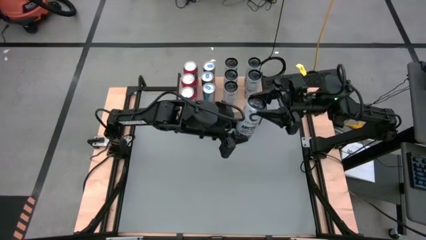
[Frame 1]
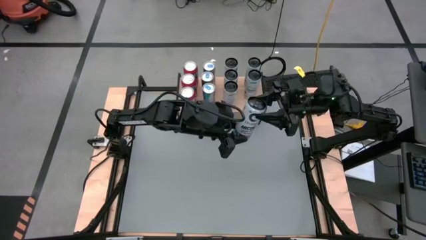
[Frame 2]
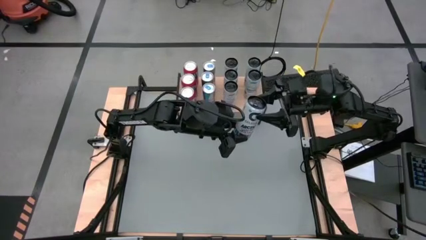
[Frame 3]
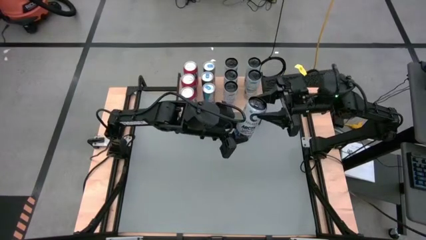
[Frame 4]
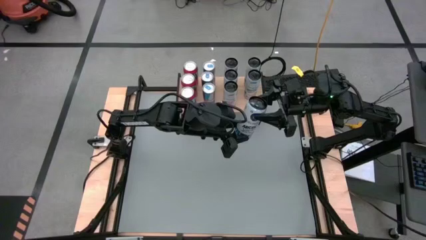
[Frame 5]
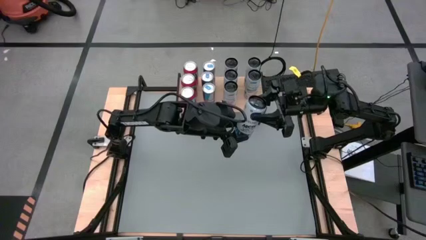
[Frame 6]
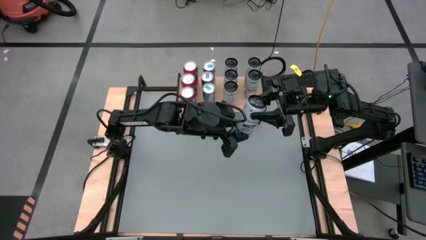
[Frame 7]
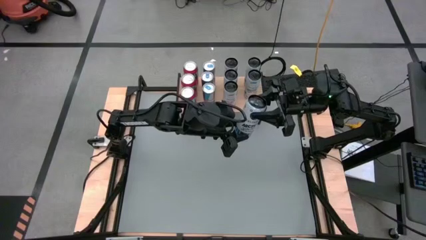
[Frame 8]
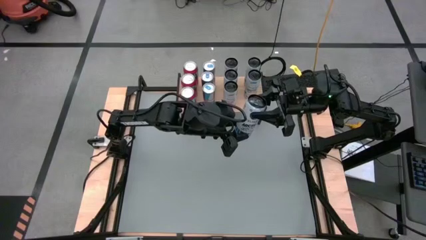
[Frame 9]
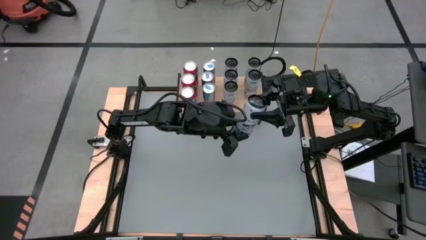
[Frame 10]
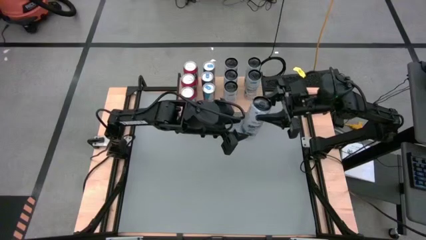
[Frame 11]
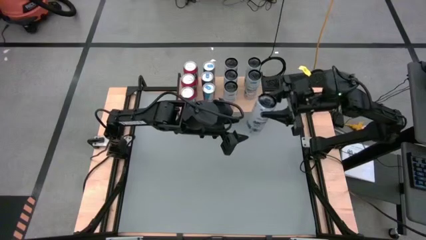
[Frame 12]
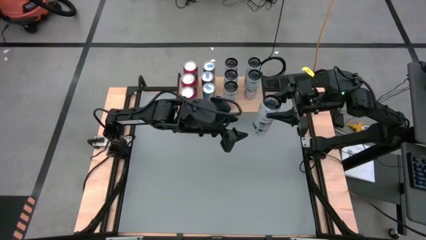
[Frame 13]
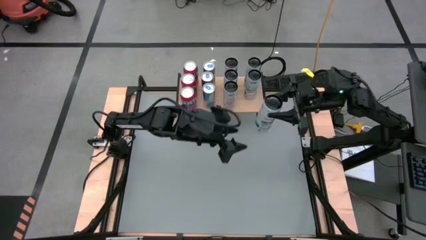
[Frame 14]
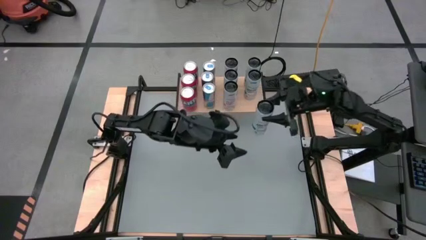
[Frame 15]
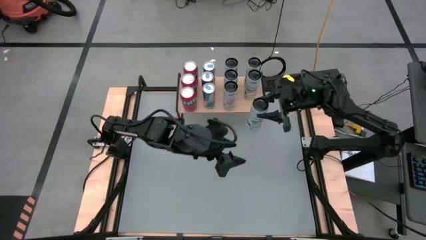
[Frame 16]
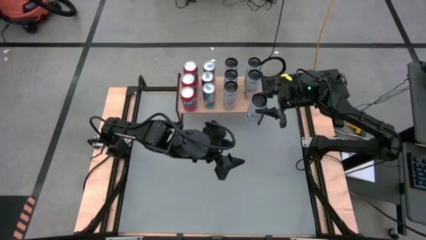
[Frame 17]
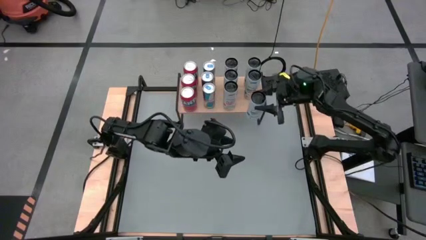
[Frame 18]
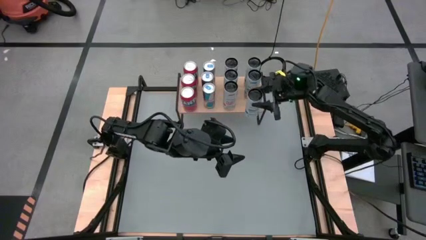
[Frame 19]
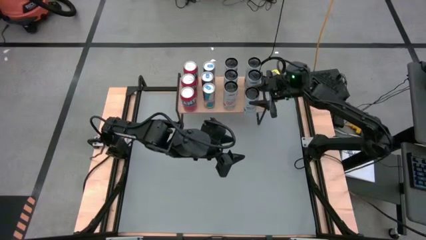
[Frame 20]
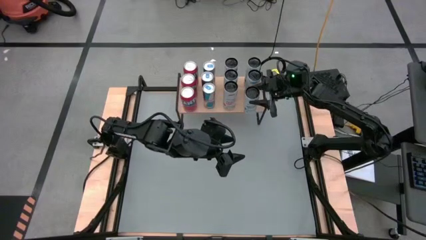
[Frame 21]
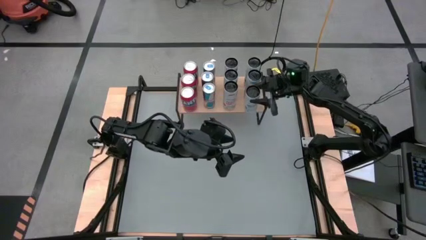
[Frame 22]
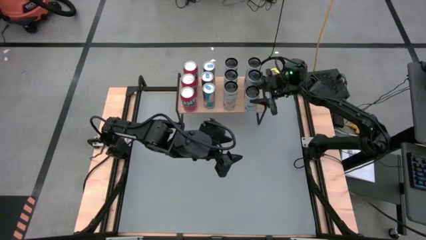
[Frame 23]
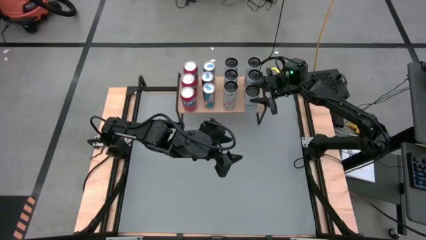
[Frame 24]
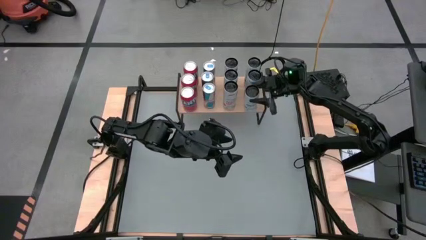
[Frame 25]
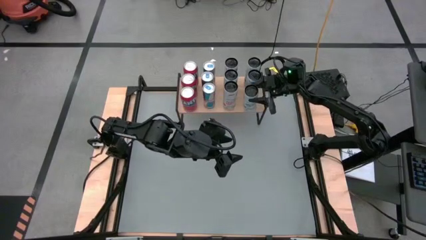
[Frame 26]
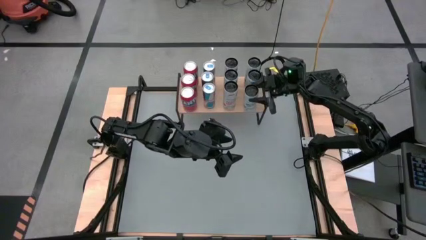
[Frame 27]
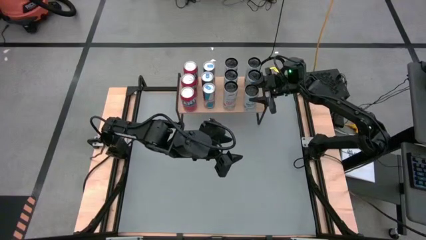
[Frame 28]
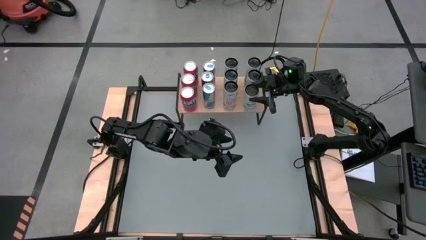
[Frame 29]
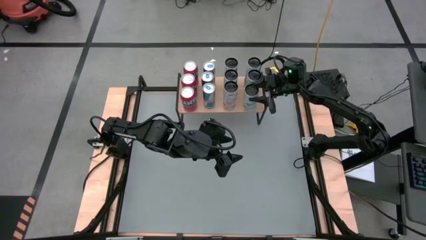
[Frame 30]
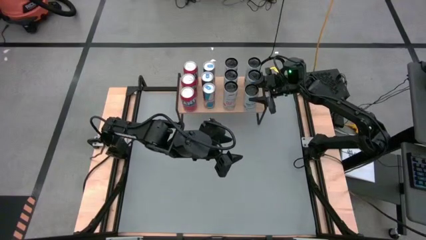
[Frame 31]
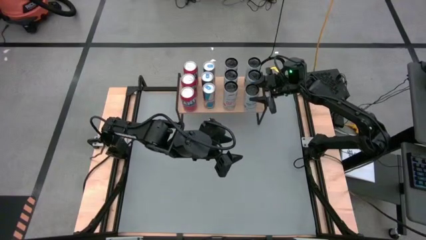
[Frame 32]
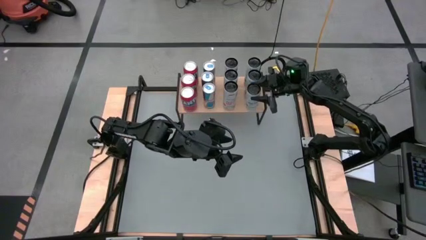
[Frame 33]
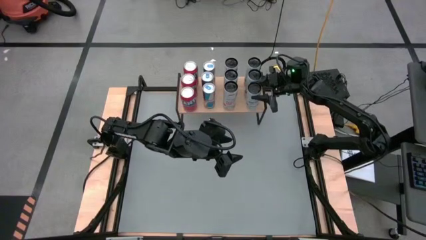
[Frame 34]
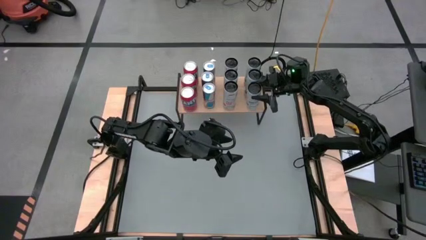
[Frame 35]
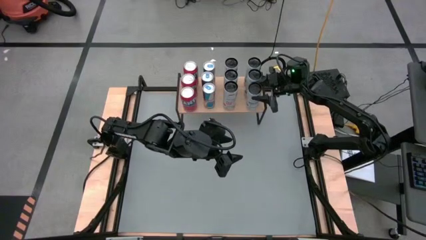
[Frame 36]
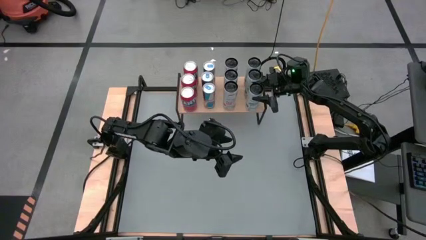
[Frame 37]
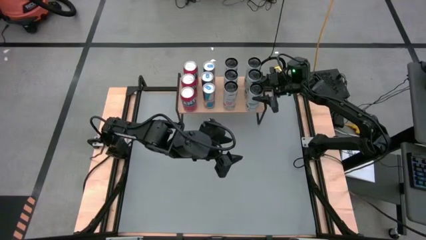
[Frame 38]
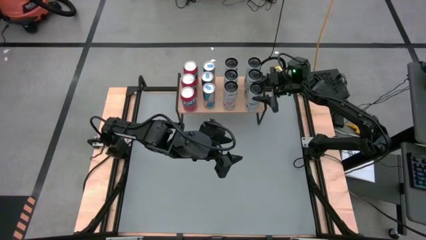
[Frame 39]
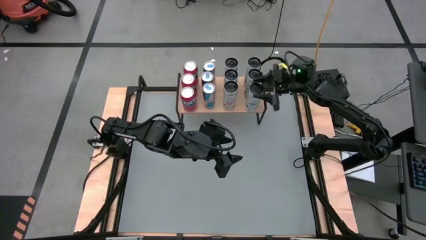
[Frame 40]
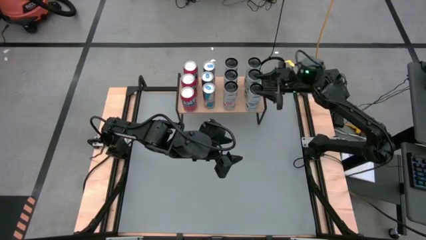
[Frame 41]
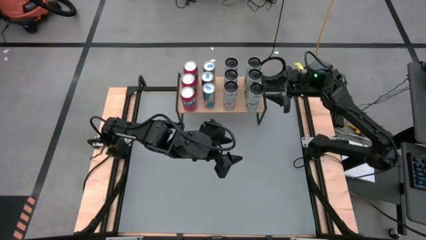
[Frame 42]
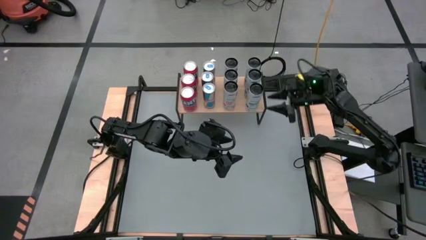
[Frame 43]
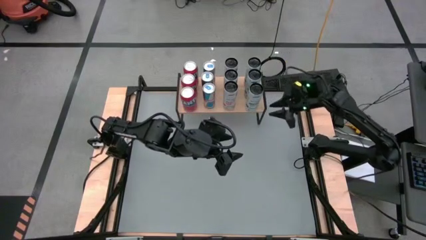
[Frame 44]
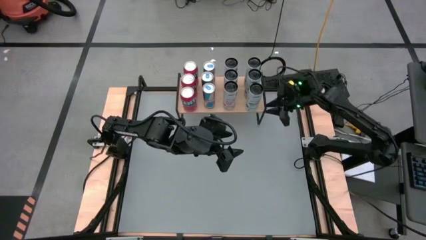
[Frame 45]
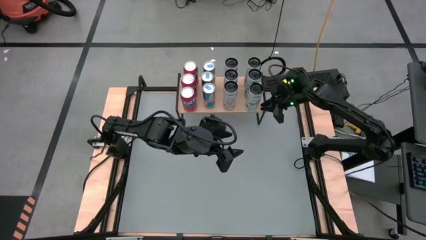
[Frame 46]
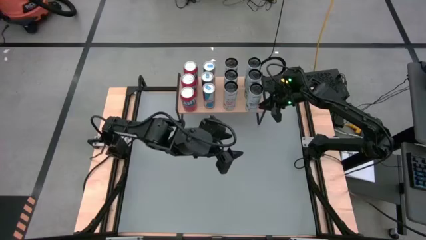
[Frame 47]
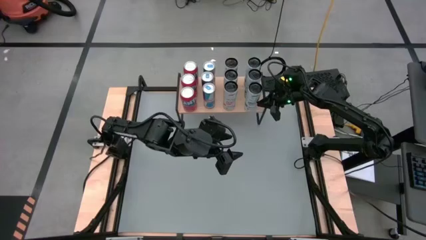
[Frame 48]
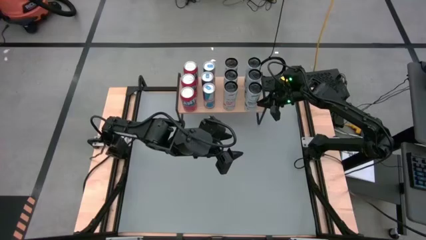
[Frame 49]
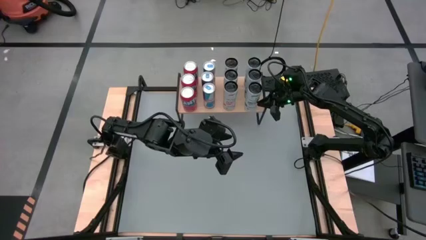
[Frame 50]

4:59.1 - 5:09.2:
Task: Place canned beverage on shelf
Put the white-blue soda can on the shelf aligned with the other white-blue soda cans

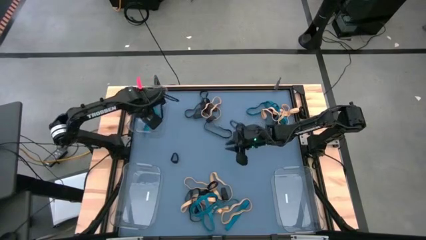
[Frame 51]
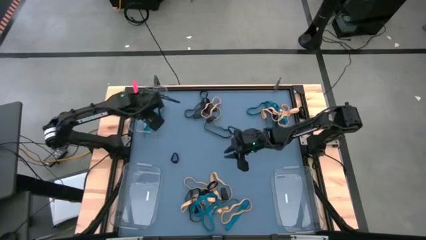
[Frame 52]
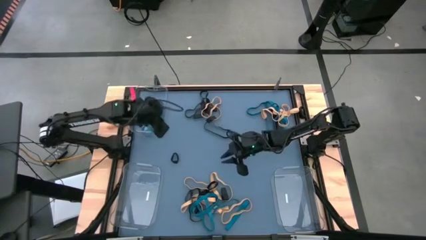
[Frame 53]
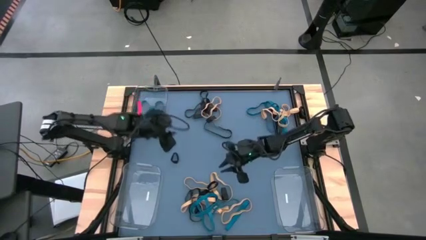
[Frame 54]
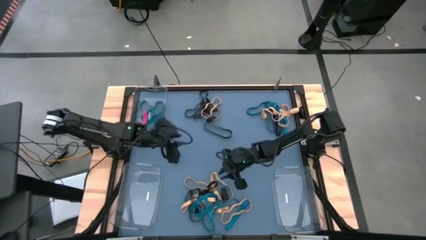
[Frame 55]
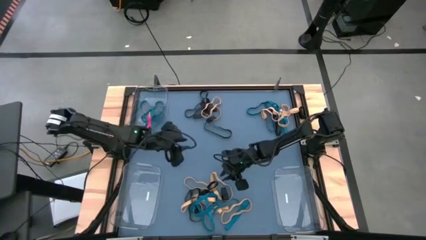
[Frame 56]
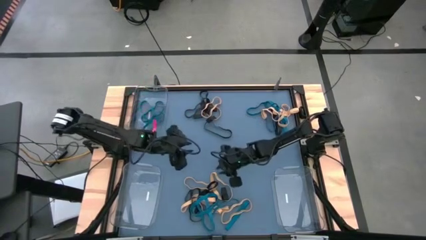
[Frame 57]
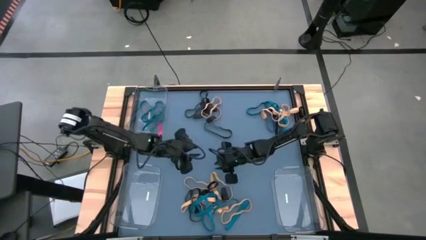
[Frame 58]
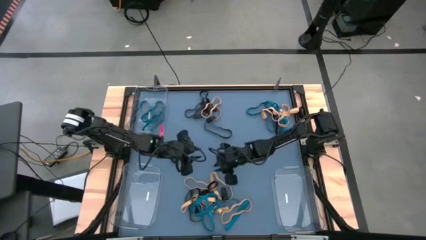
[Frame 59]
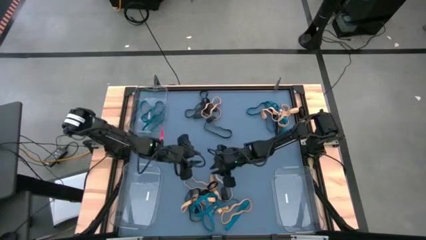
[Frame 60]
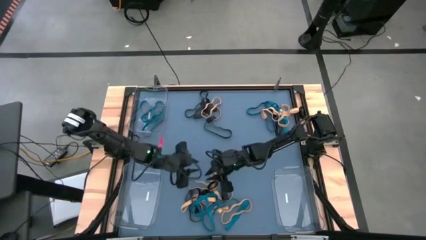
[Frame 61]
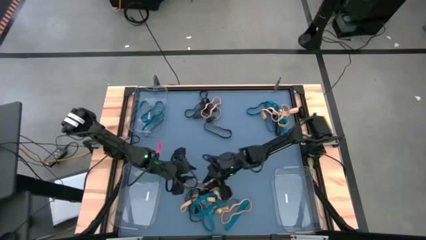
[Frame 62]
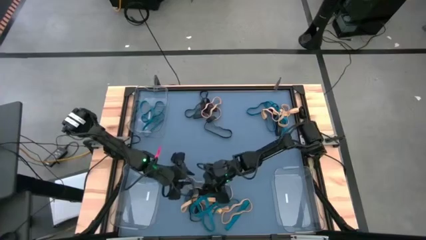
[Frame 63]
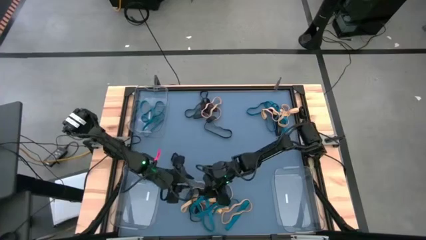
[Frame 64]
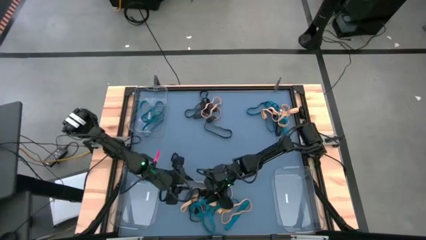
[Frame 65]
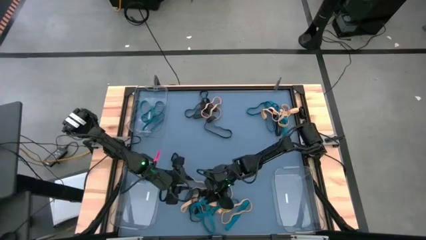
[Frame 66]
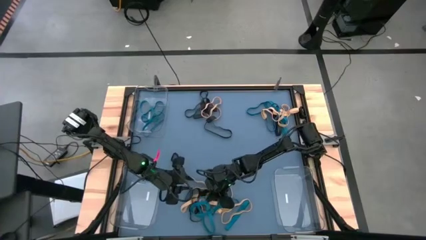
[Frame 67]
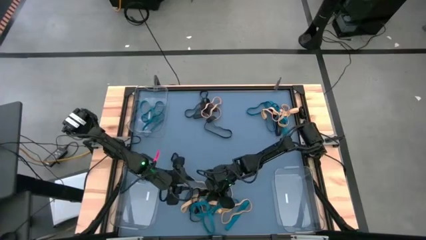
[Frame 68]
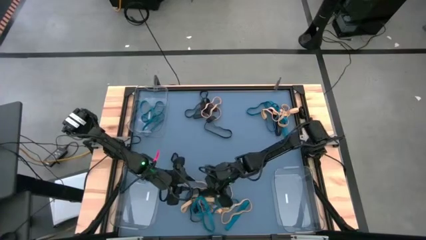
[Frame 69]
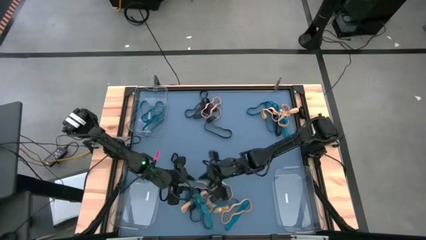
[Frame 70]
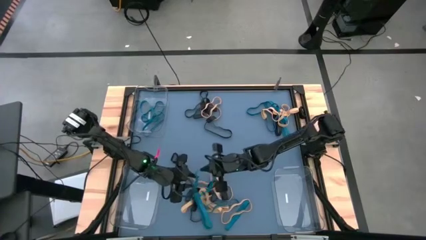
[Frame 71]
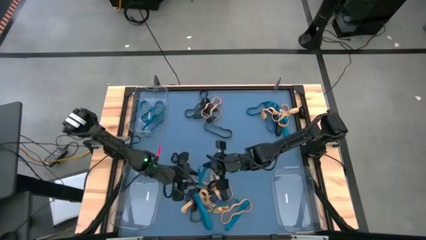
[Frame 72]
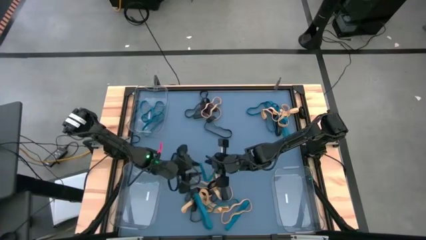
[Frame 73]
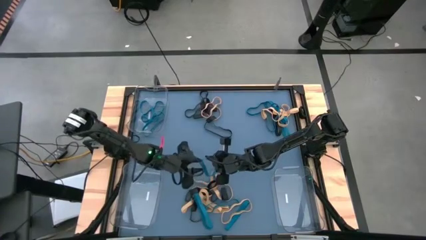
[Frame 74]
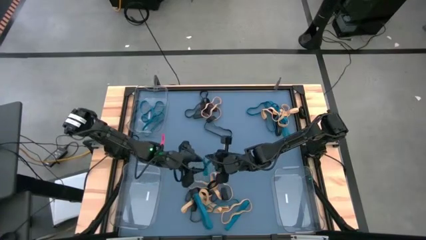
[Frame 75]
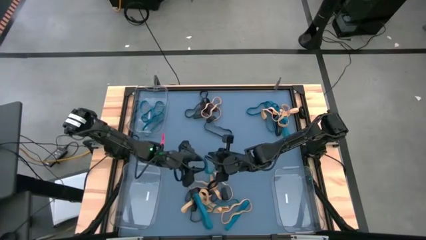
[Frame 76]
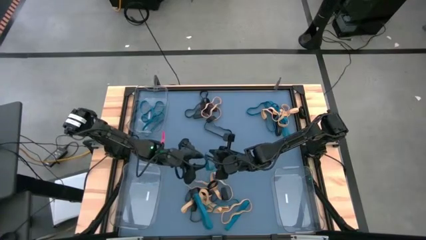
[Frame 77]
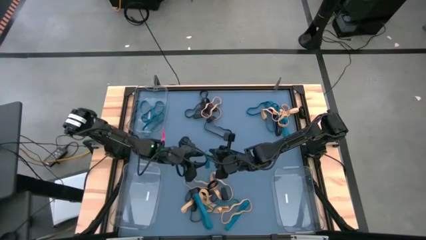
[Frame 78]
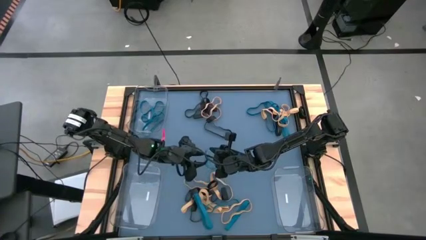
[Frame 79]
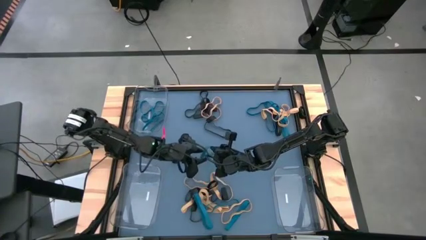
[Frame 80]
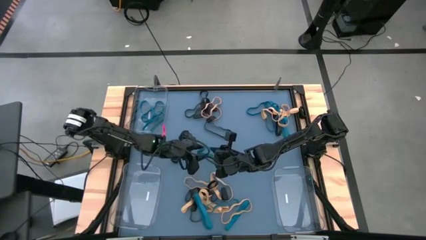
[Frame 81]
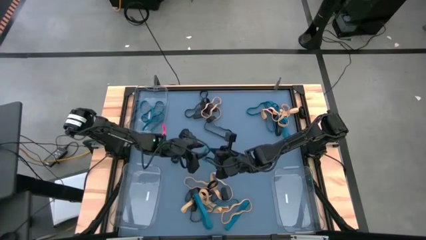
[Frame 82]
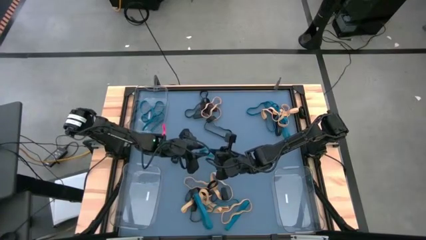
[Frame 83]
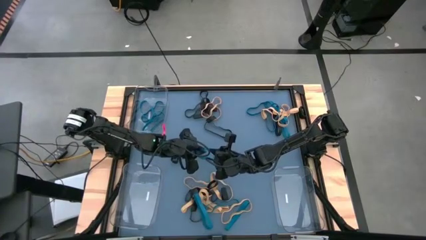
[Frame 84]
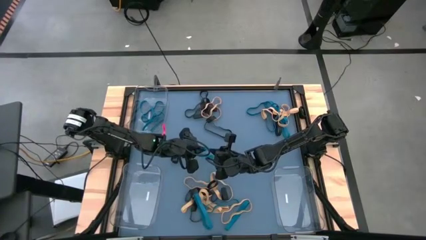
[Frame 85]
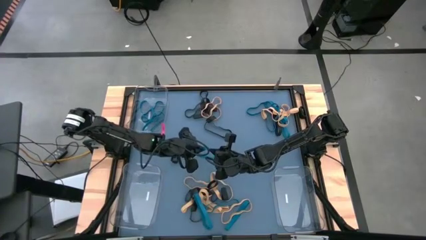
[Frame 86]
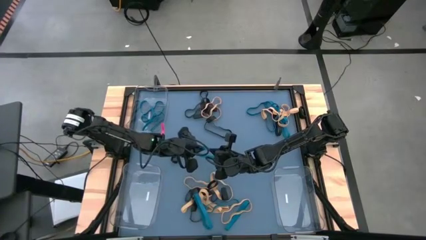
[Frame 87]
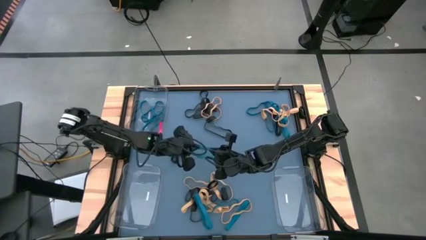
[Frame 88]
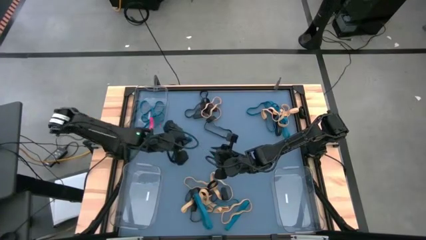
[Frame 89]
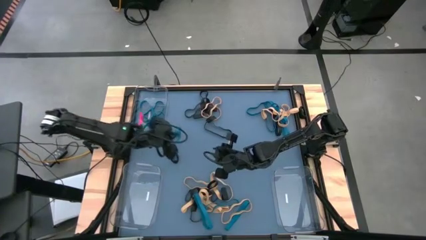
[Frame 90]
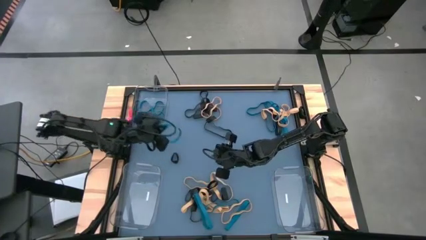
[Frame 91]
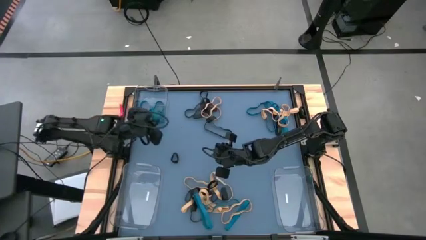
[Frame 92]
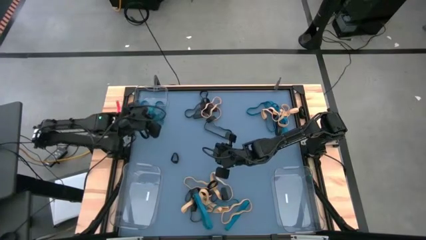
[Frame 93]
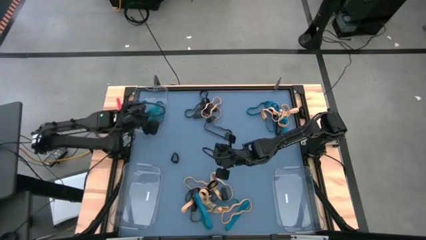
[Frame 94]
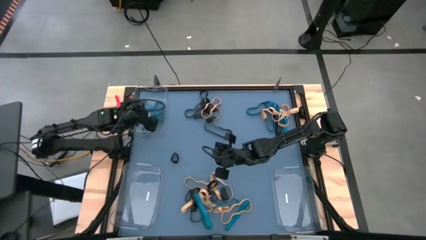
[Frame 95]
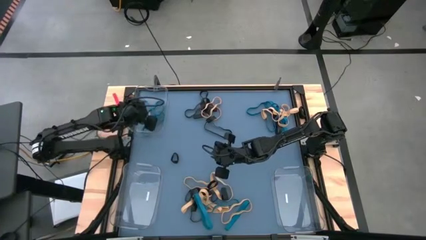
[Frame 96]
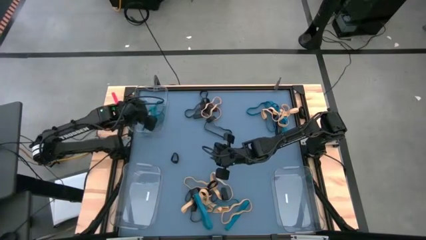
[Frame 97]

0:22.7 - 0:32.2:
Task: Sort rubber bands into baskets
Put the blue rubber band into the top transparent bin
